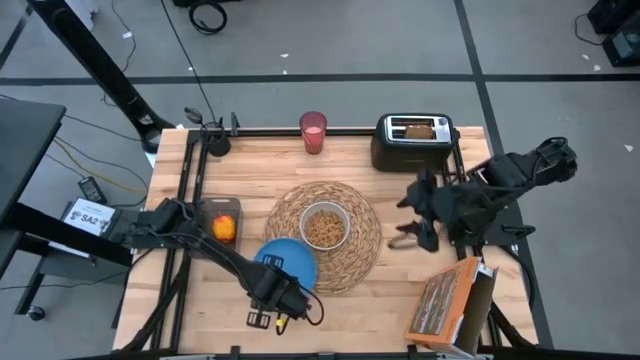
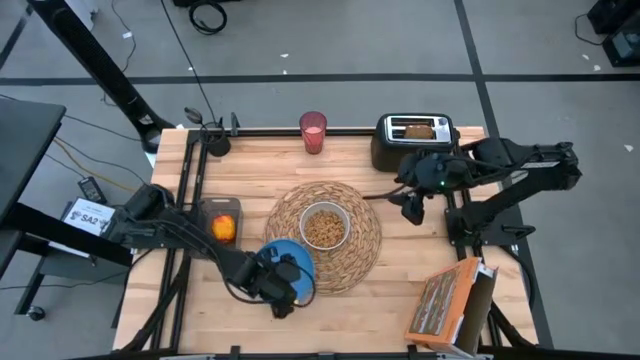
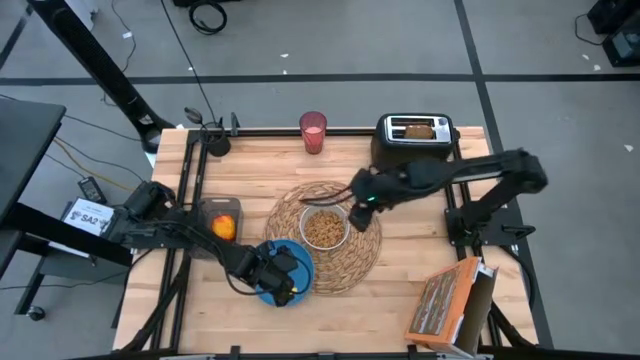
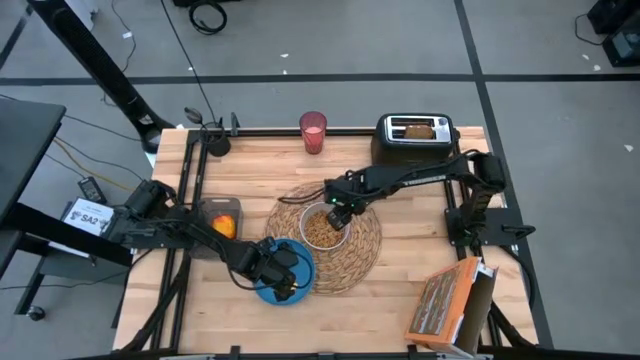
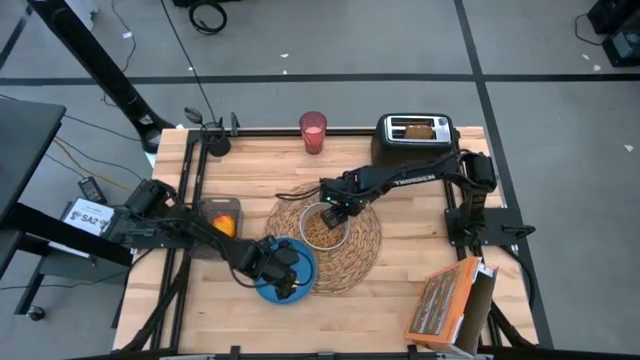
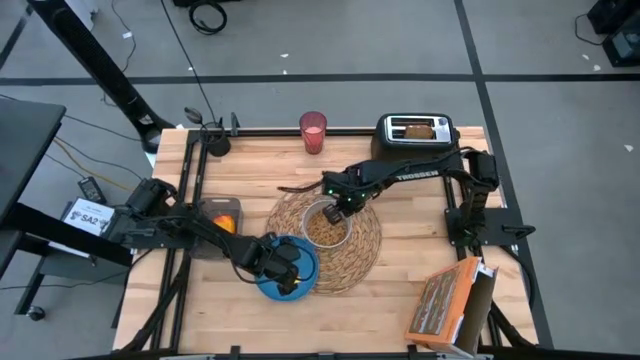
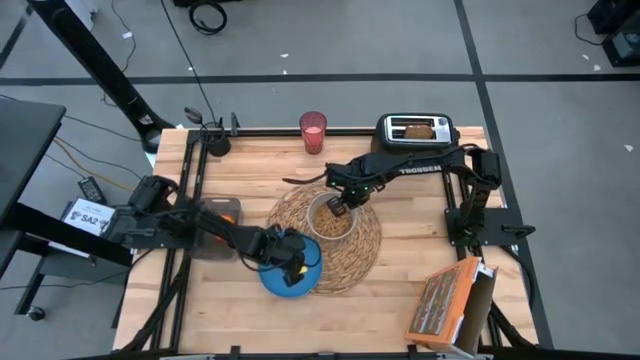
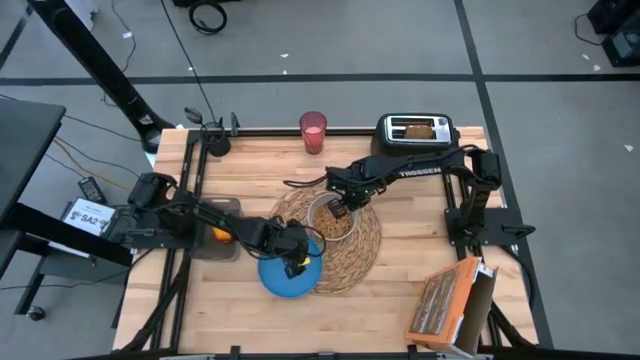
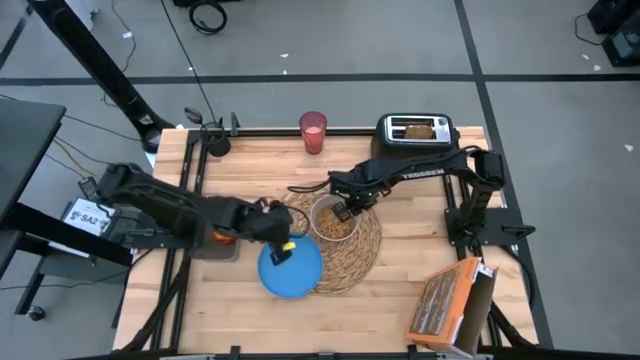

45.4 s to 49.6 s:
Task: Arrange a breakfast setting
Adjust the white bowl

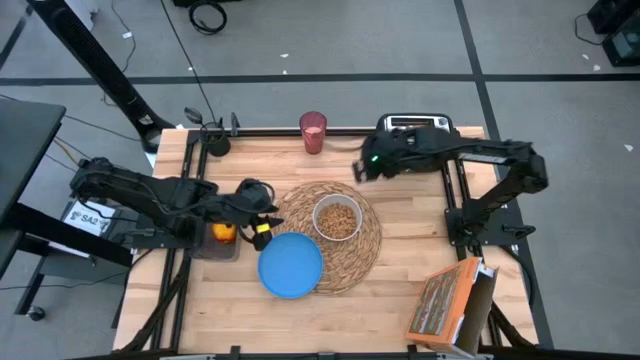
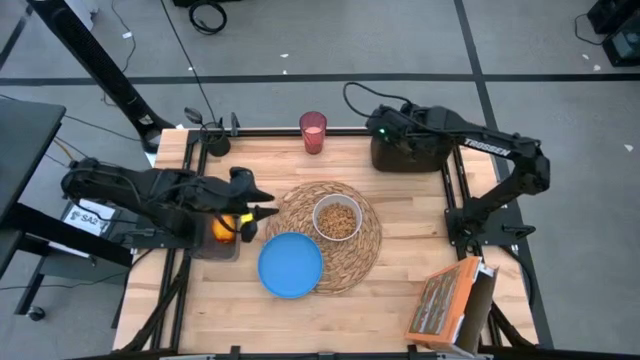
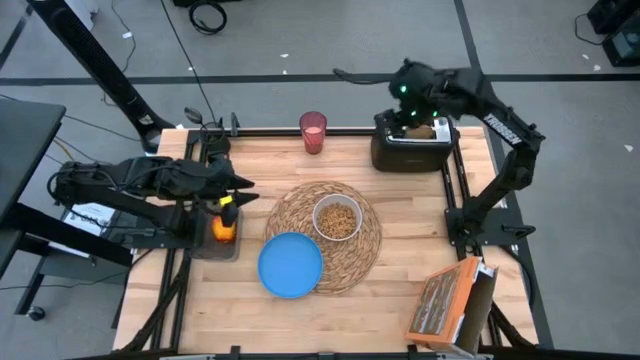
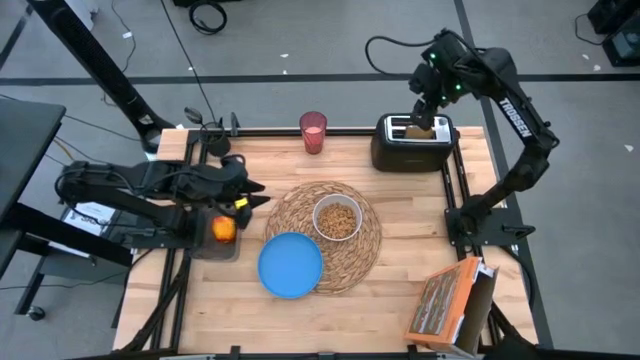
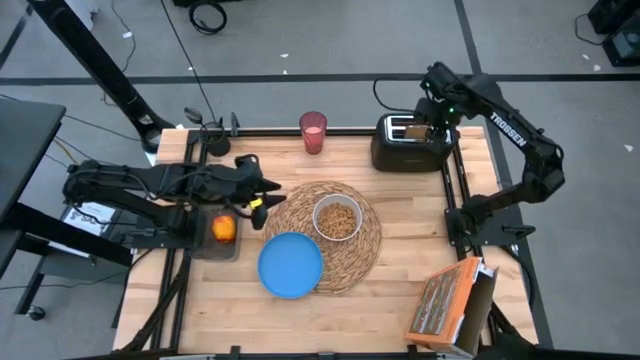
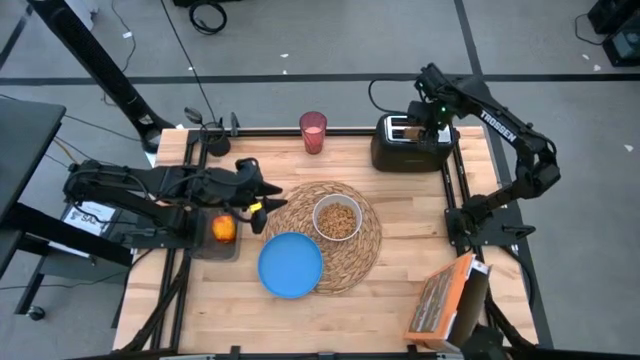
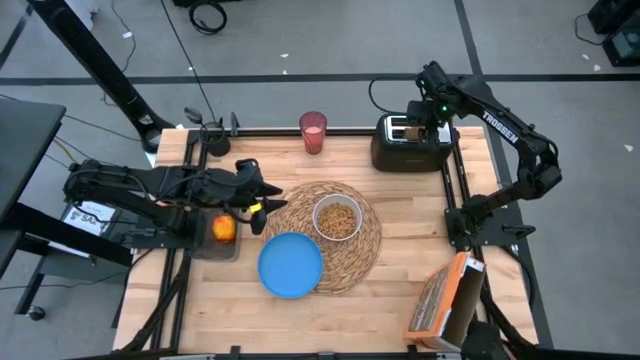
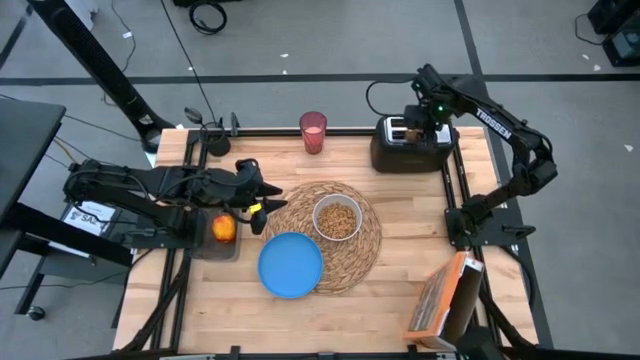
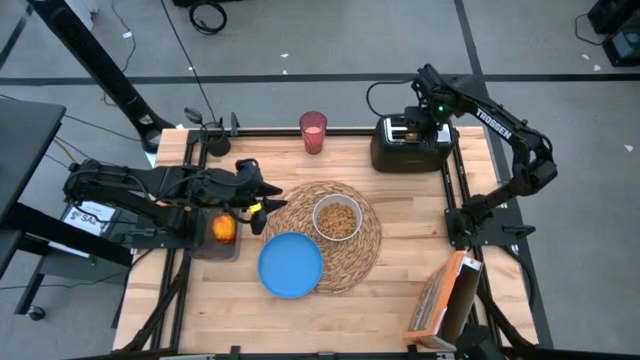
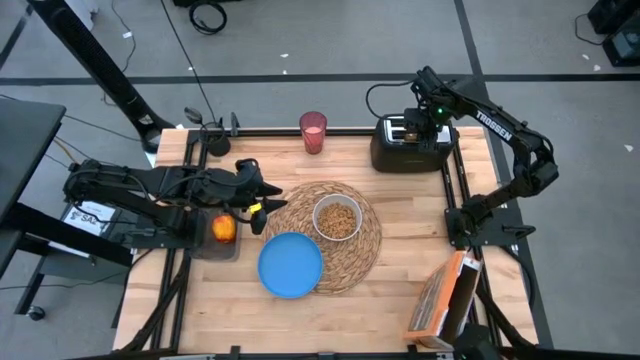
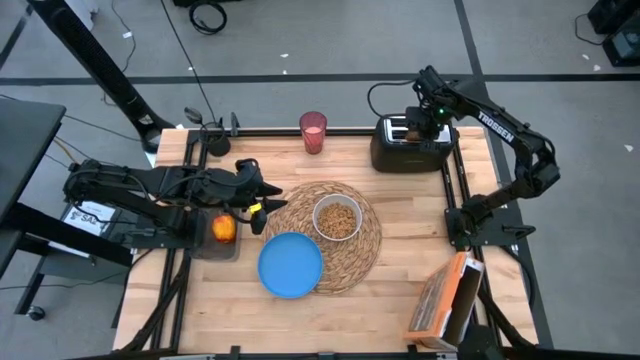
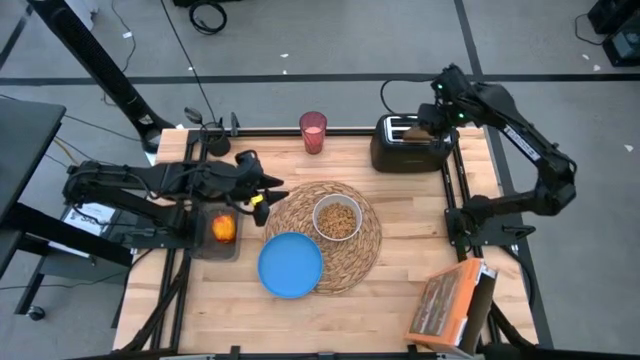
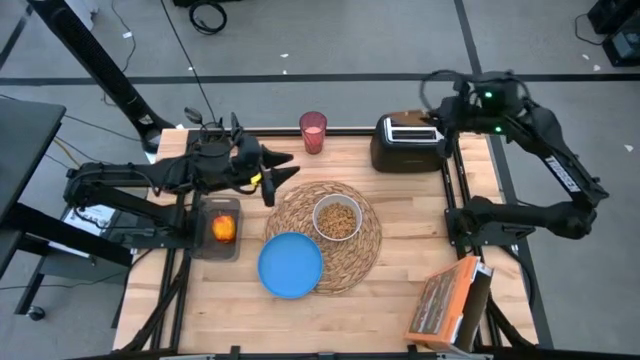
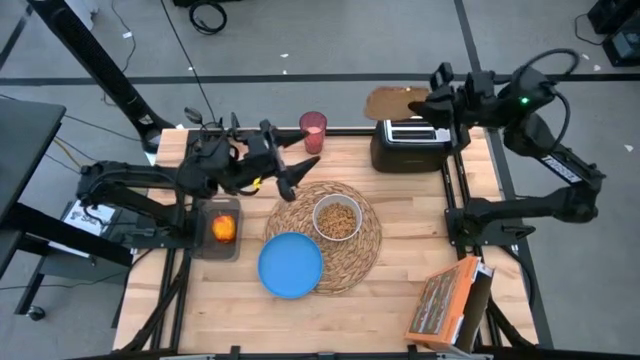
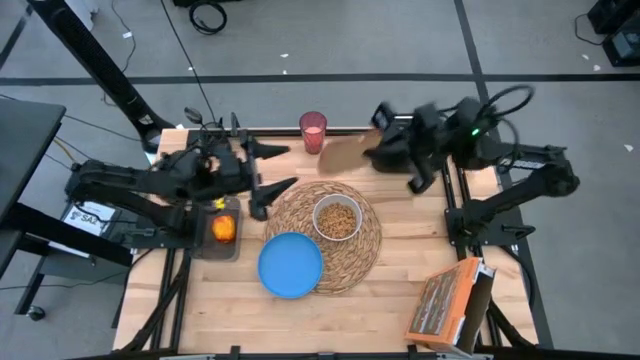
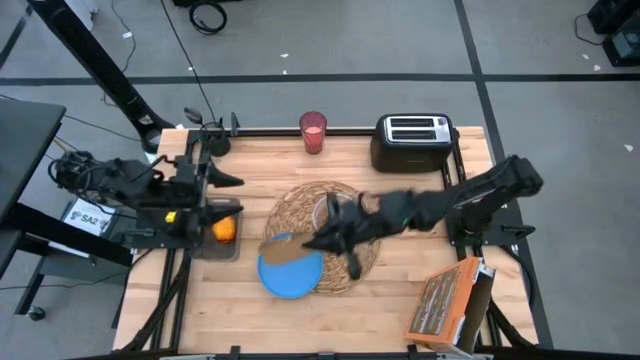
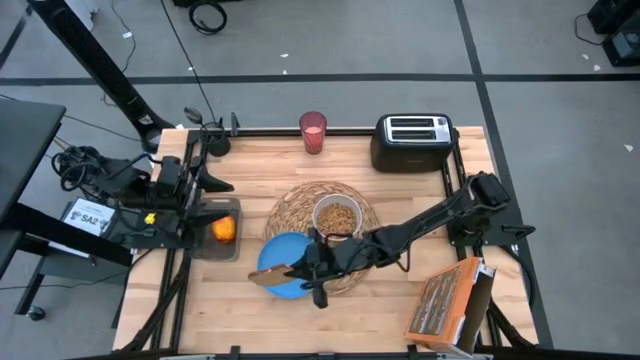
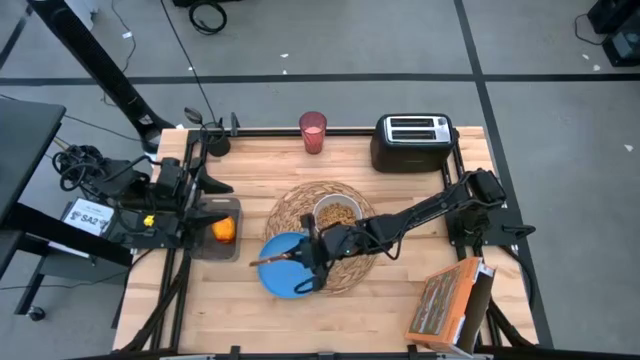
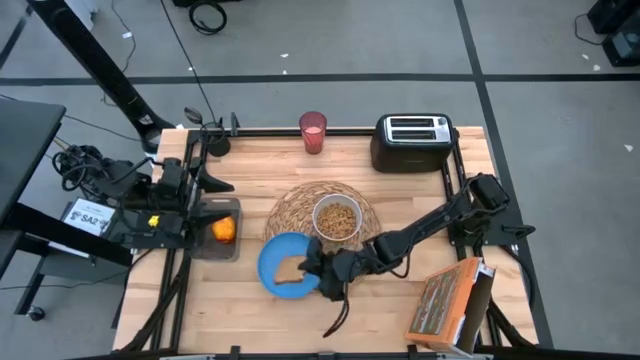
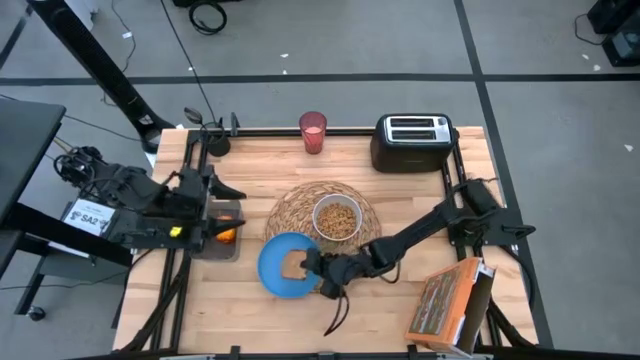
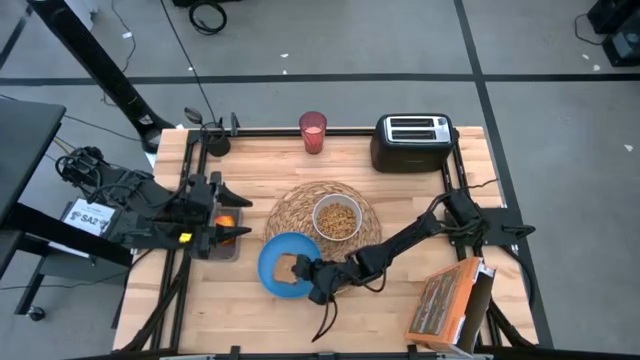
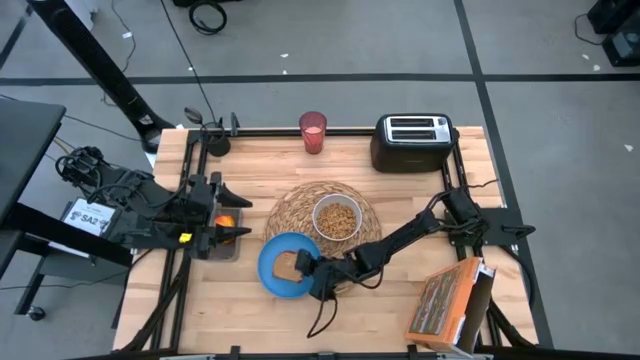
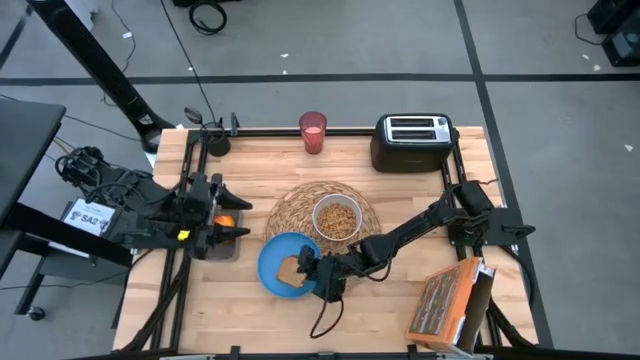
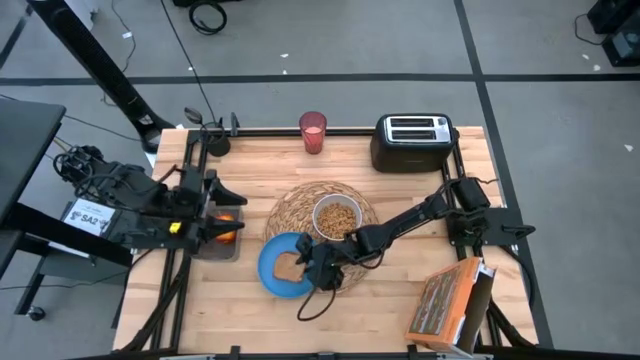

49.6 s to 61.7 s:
Put the toasted bread on the blue plate

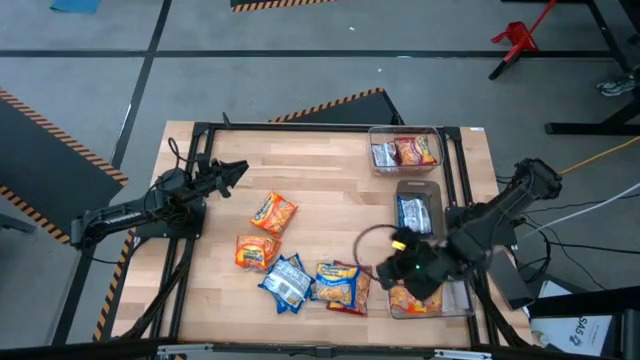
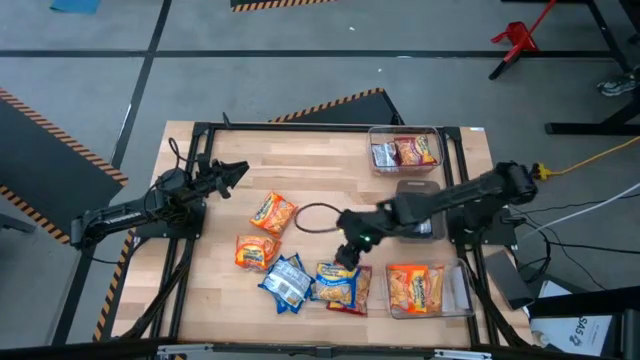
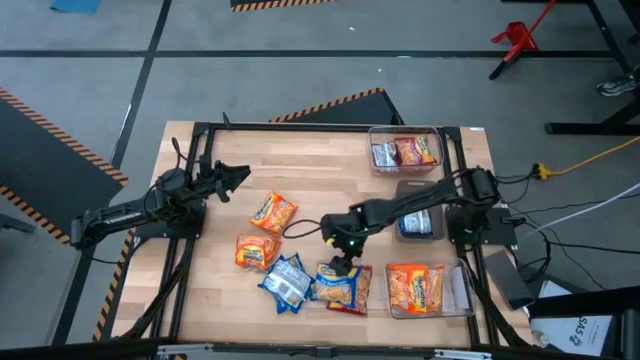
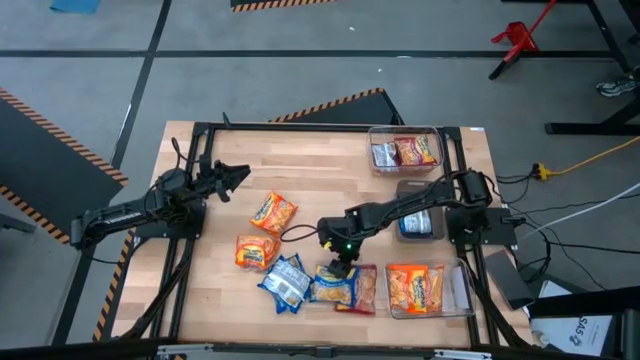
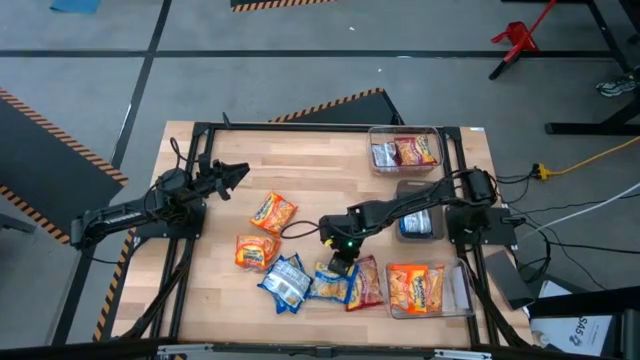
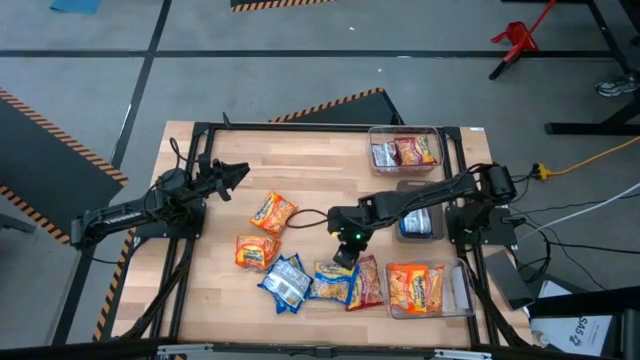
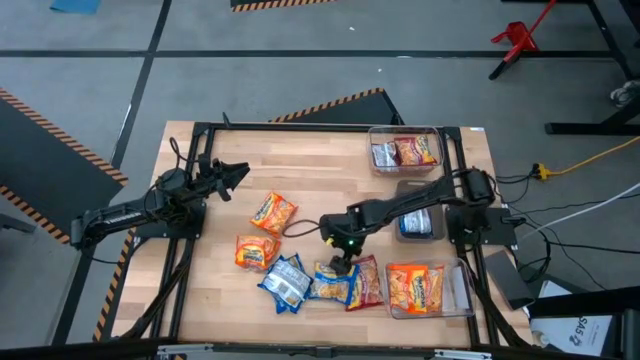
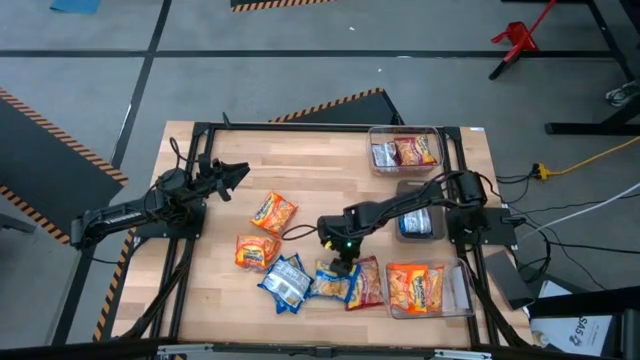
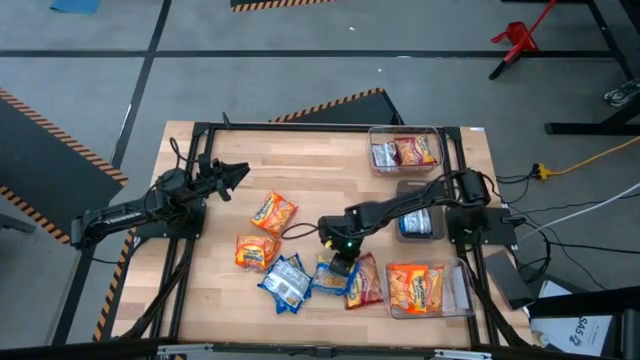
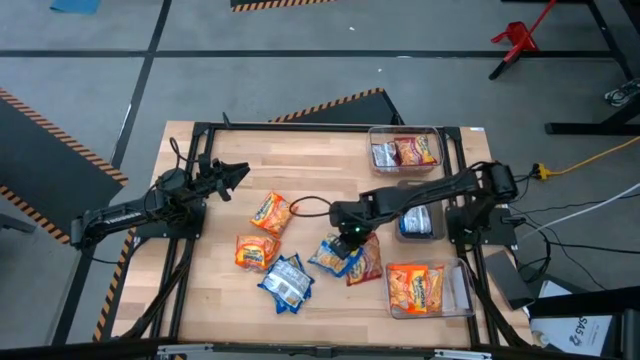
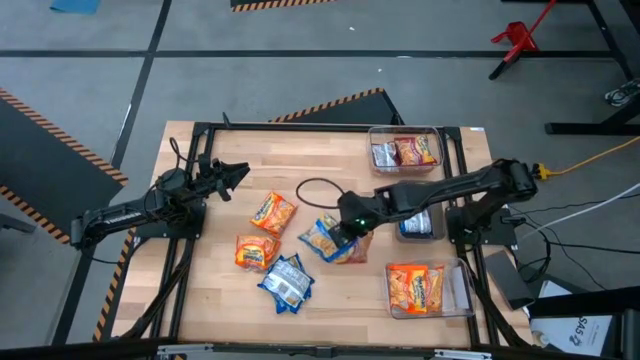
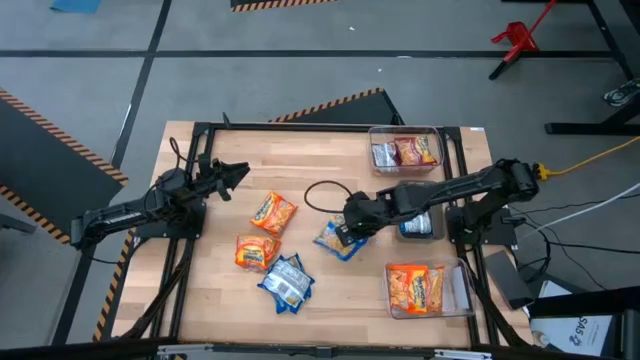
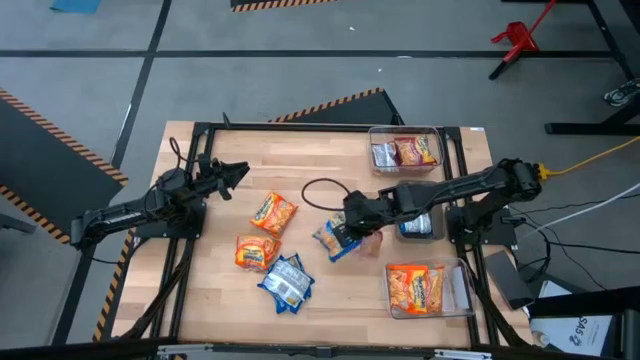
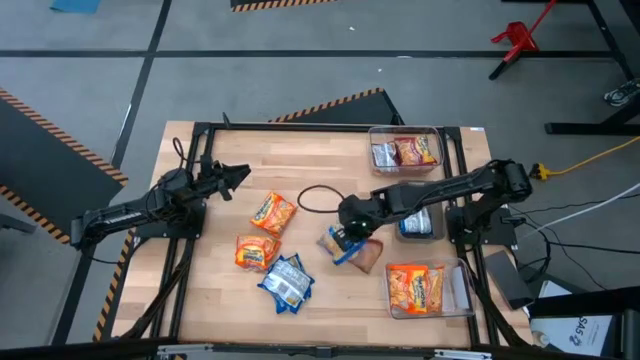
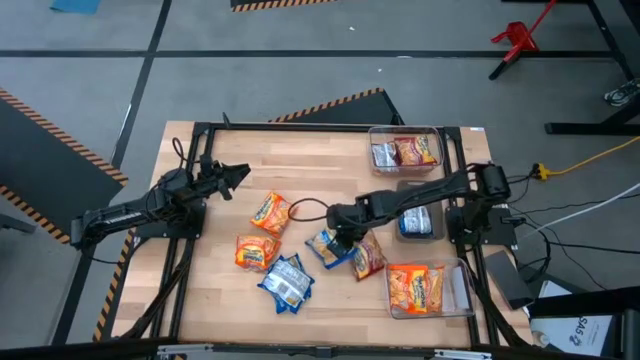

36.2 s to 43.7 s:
Task: Sort Maruchan noodles
Put the blue noodle pack into the black bin
